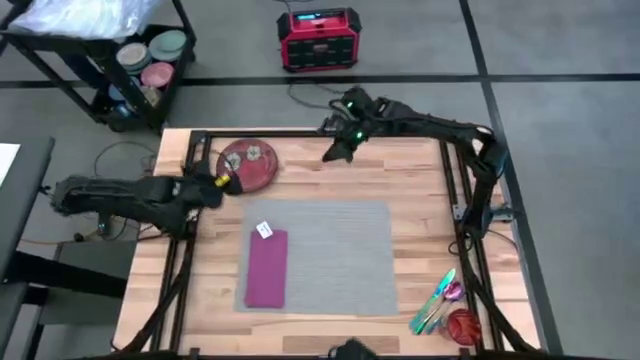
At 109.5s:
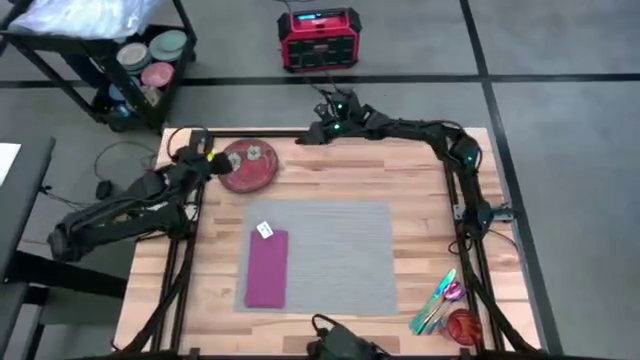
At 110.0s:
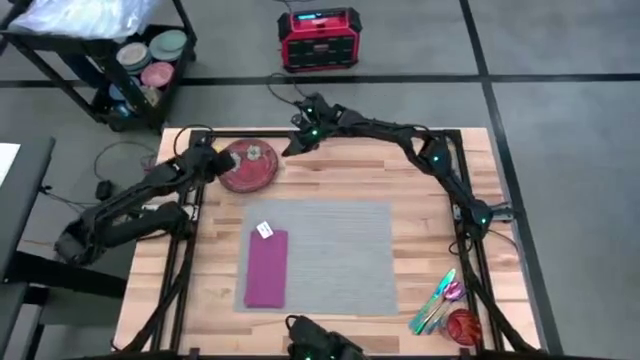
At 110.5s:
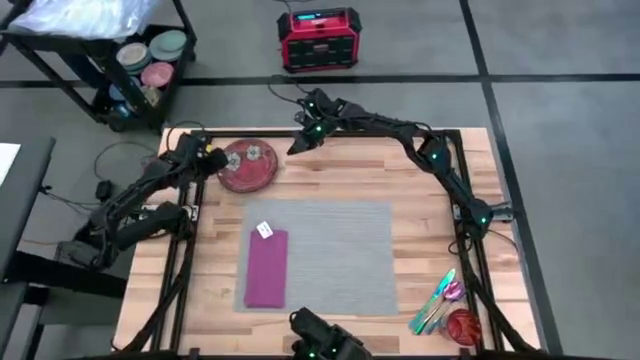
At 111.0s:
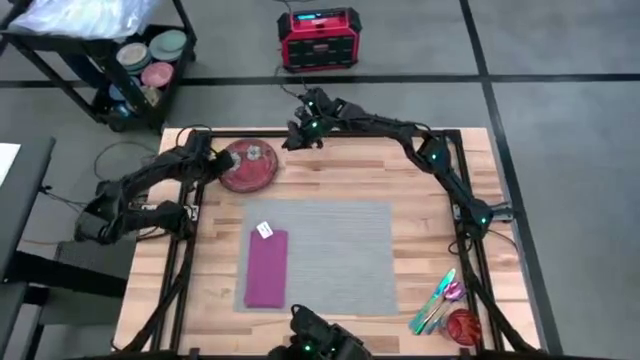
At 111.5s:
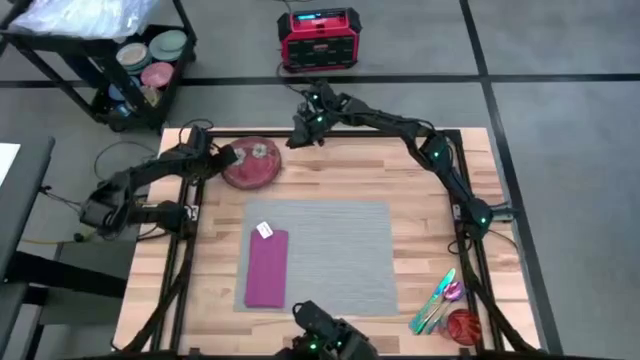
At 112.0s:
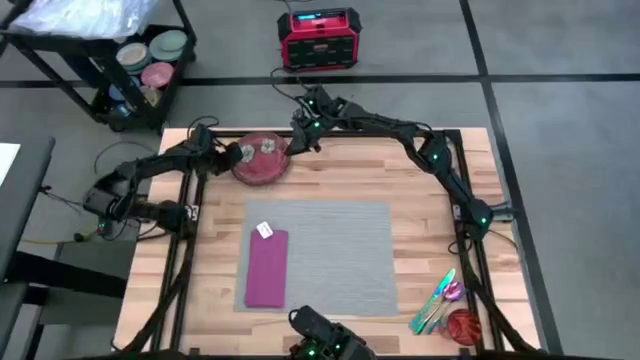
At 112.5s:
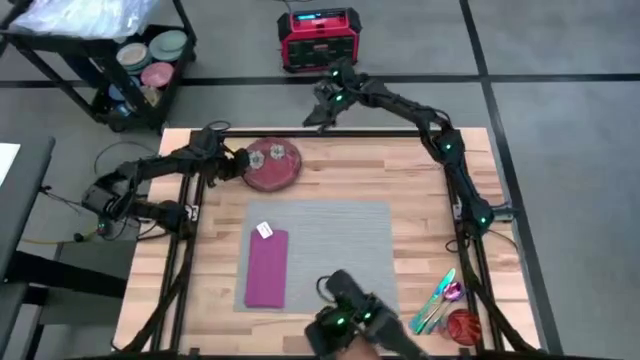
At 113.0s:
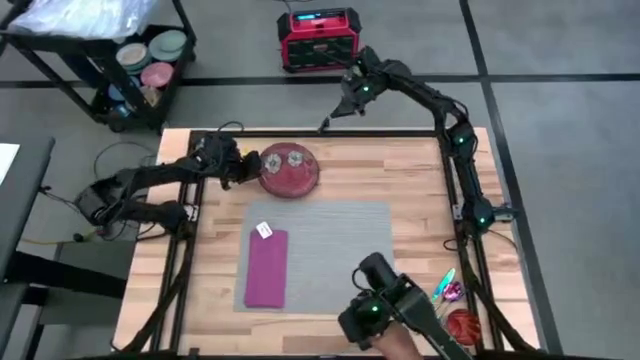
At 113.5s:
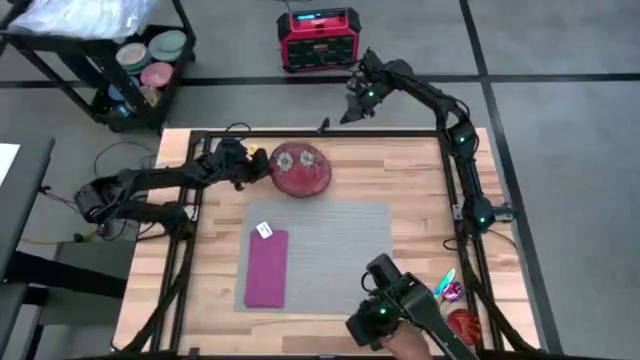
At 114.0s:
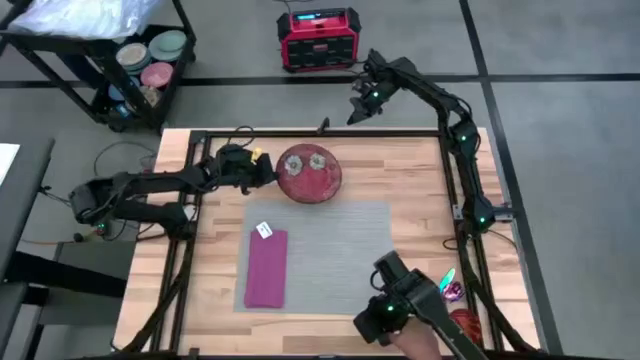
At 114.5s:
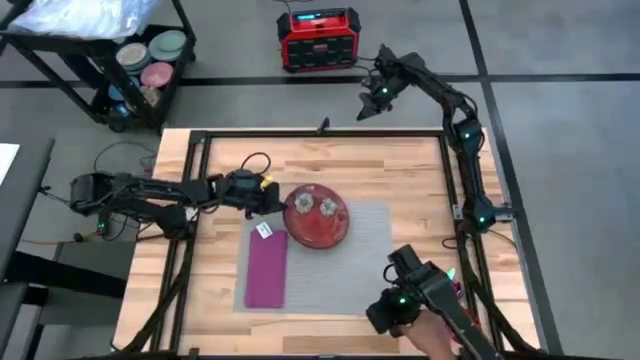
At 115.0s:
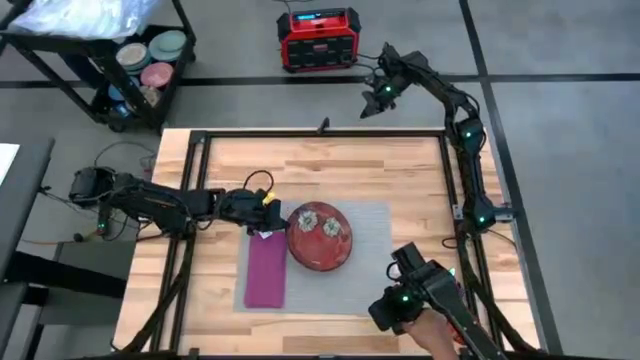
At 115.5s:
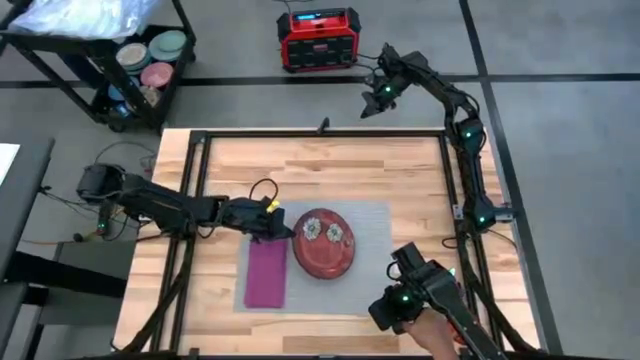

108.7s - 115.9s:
Task: Set table place
Put the red plate on the gray table mat

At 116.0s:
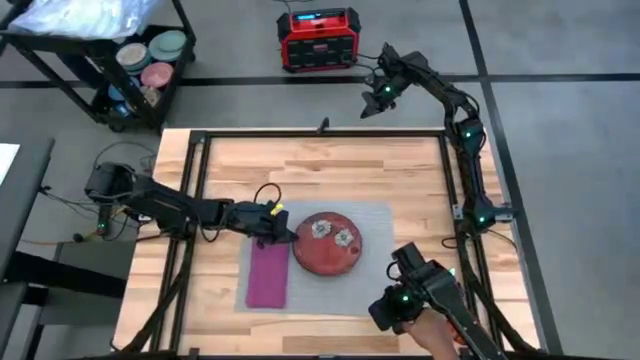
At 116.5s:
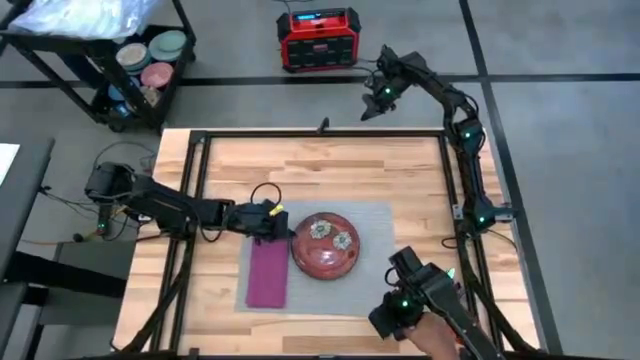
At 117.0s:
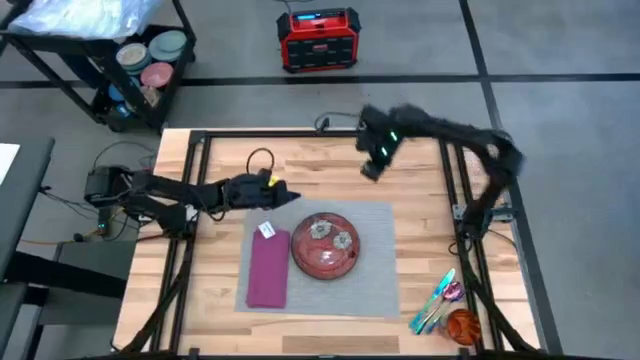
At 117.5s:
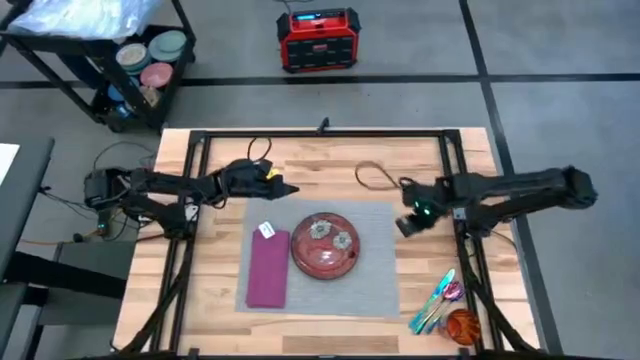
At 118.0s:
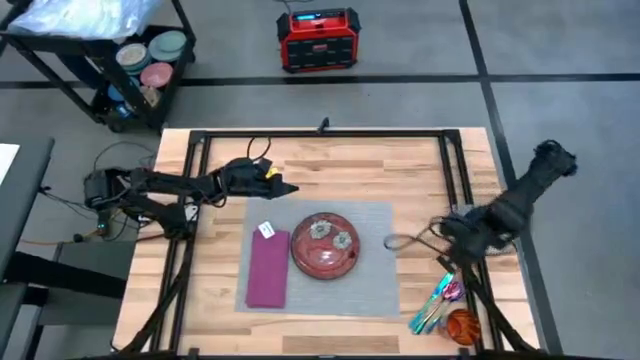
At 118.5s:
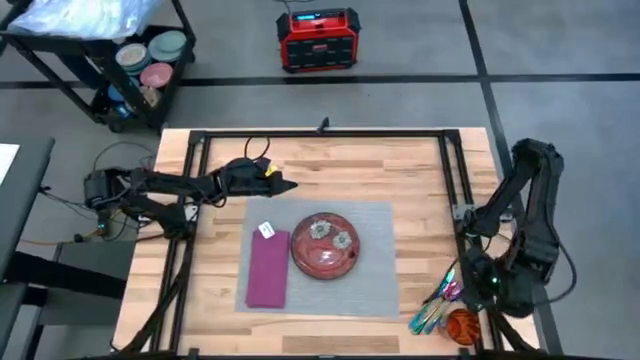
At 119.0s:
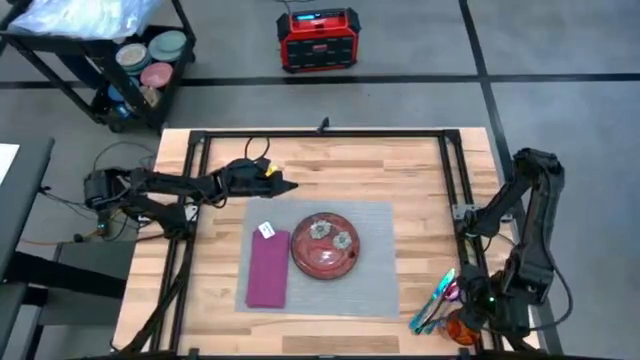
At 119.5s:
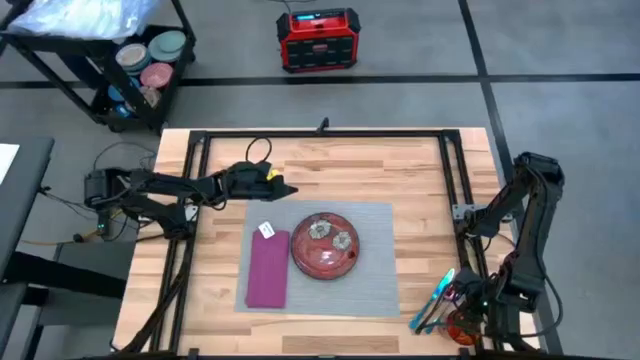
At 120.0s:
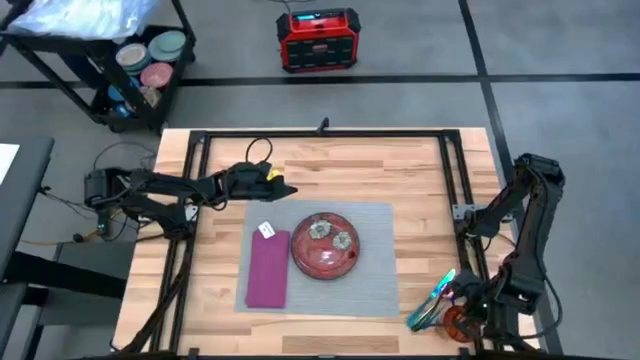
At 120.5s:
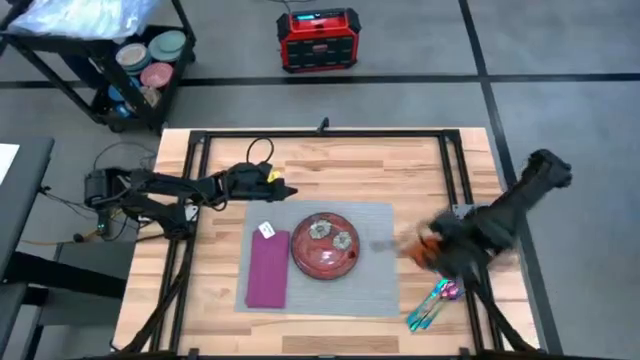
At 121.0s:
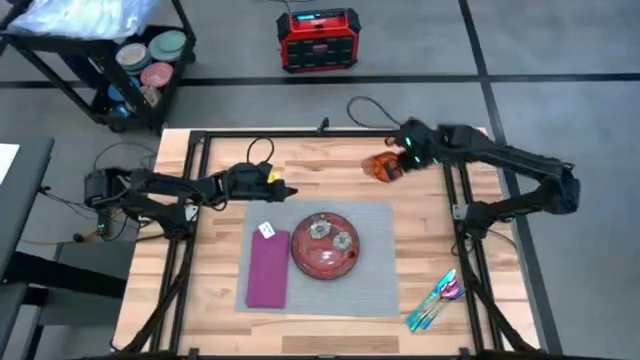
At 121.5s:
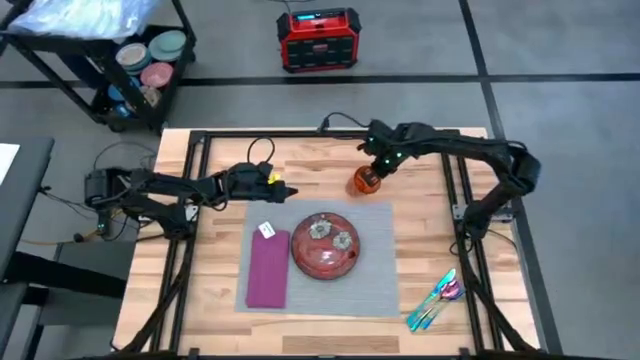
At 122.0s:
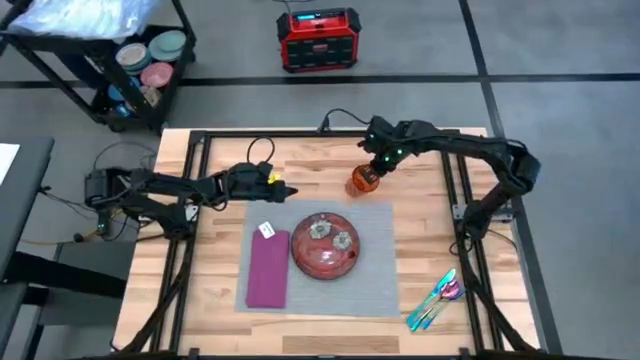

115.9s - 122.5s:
Put the orange glass cup on the gray table mat

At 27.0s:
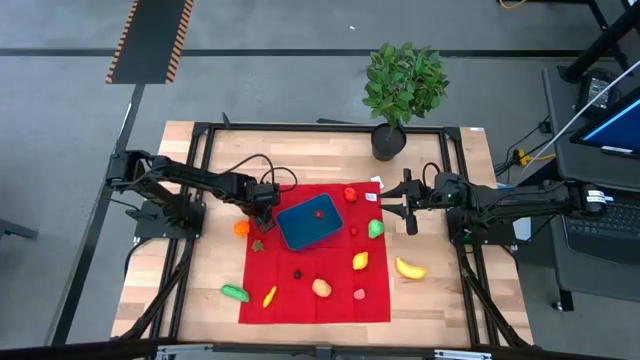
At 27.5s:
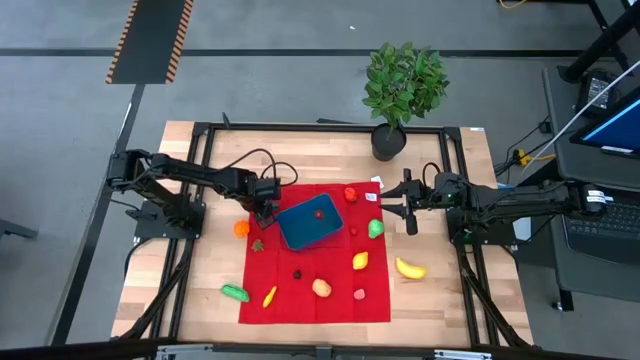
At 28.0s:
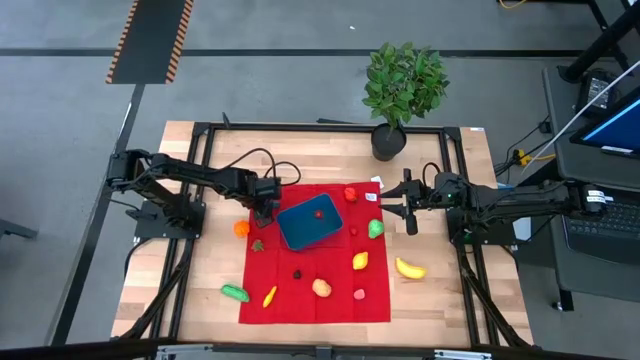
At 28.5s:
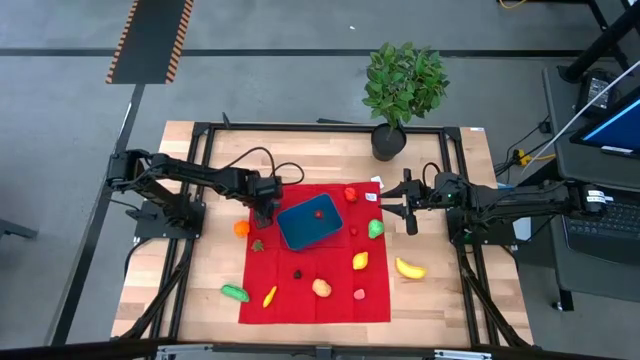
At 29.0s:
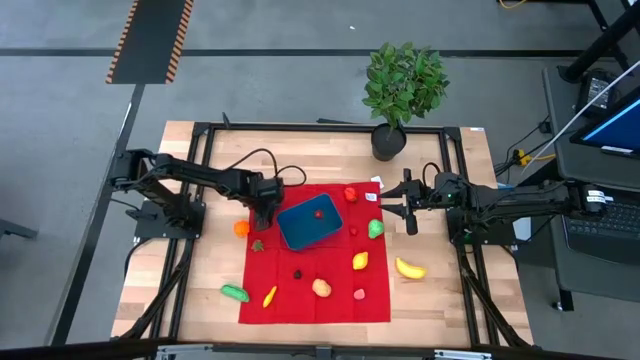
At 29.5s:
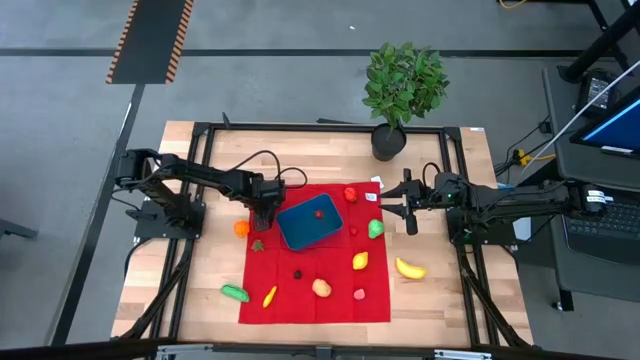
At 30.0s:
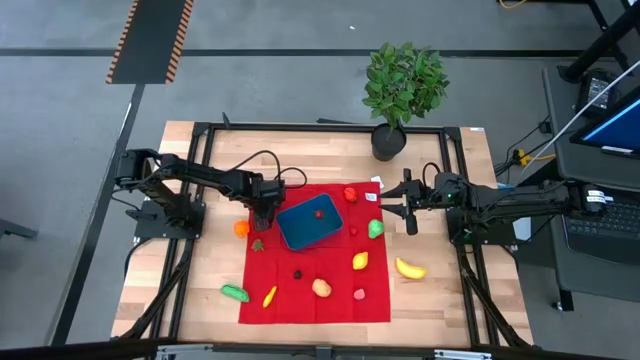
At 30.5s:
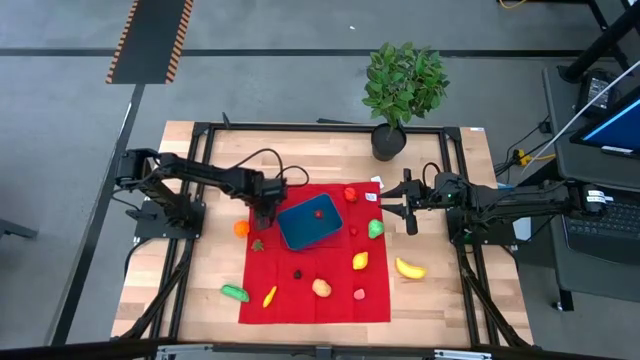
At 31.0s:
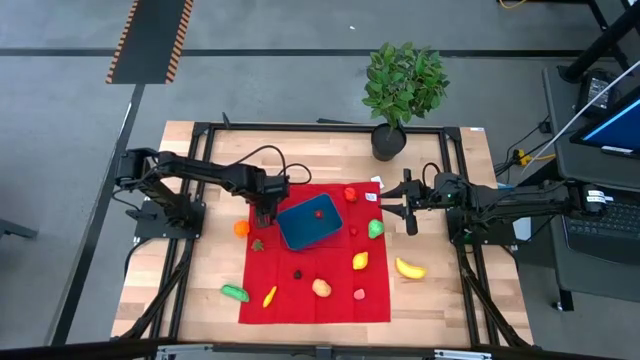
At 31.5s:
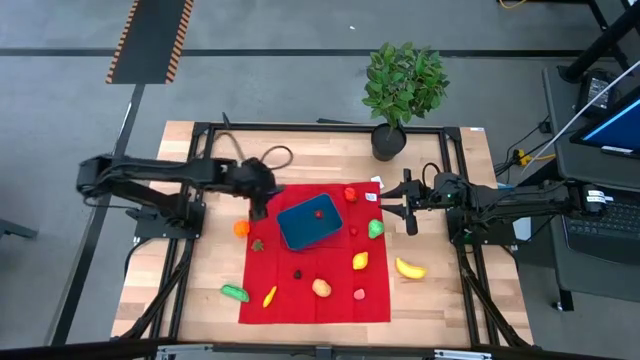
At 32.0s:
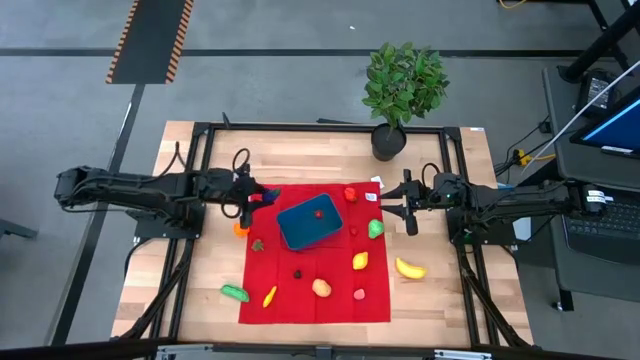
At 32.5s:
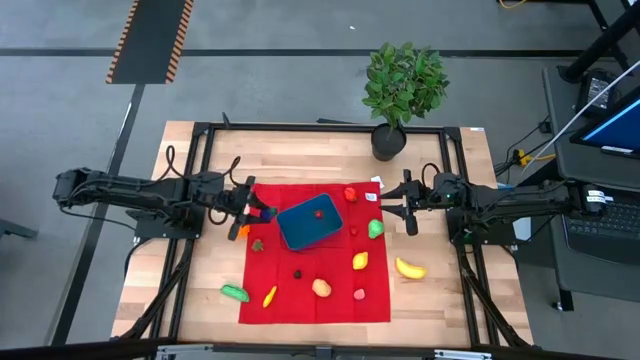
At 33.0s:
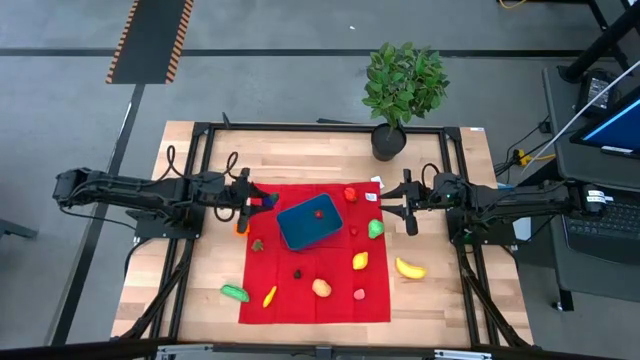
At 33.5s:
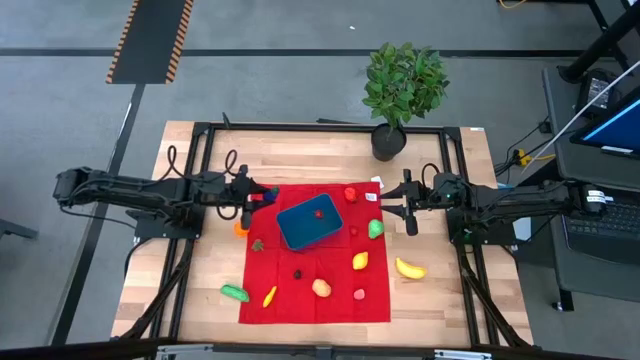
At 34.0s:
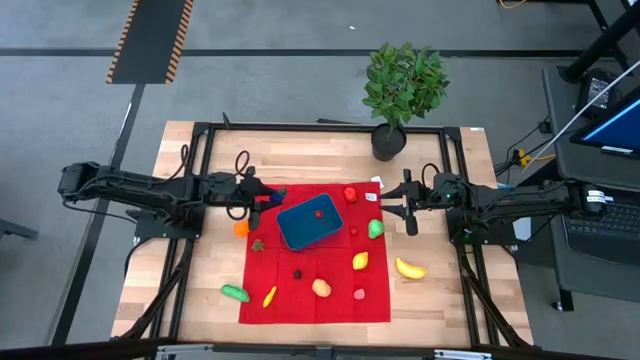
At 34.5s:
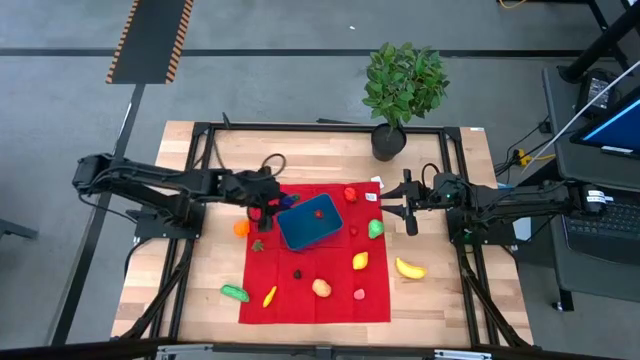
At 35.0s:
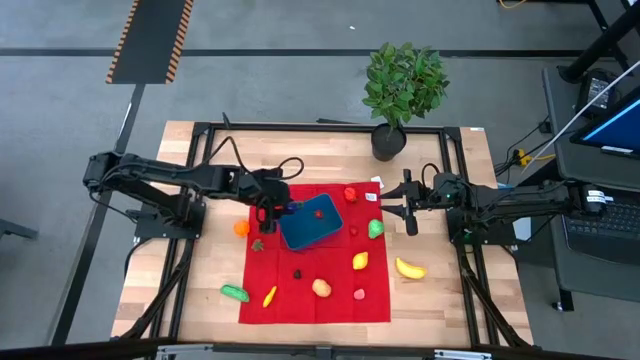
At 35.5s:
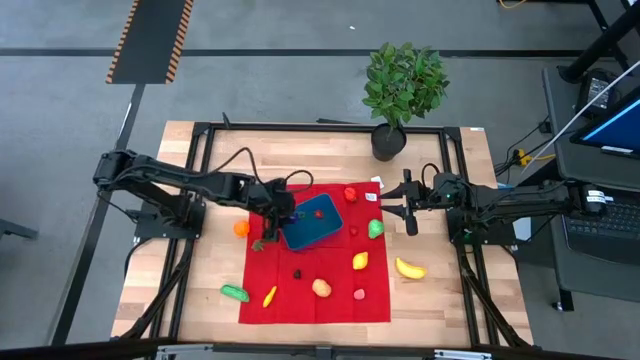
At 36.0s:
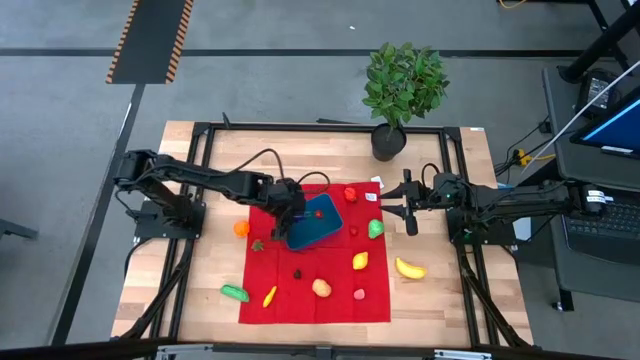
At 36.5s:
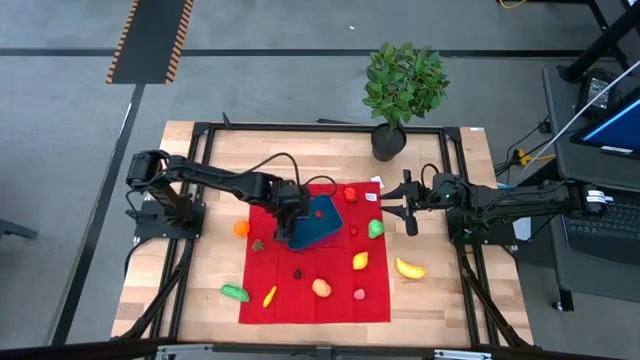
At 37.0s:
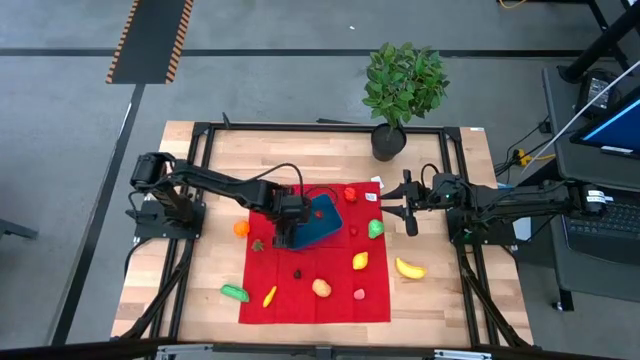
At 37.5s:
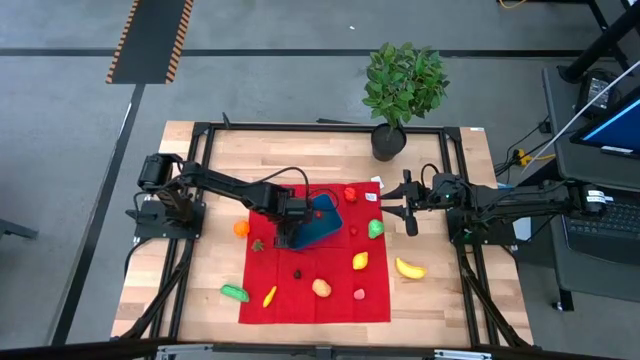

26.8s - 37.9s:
Task: Pick and placing Produce into tupperware
Put the eggplant into the blue bin
